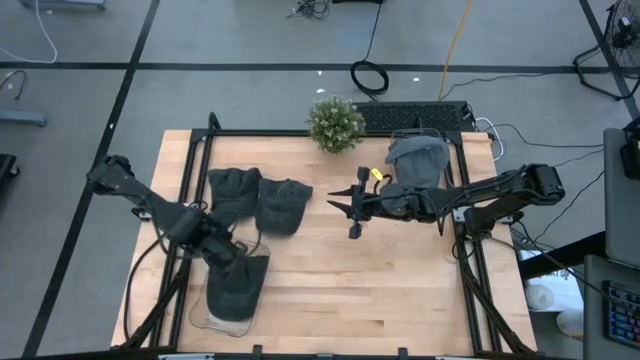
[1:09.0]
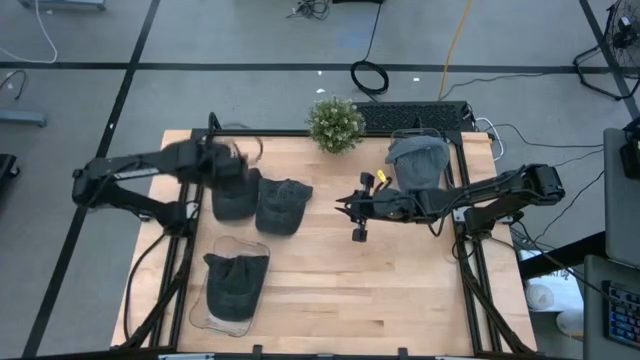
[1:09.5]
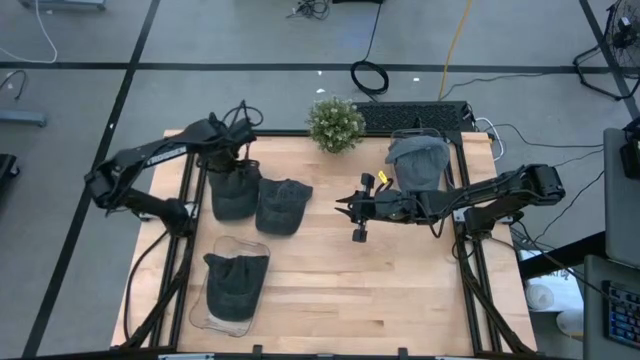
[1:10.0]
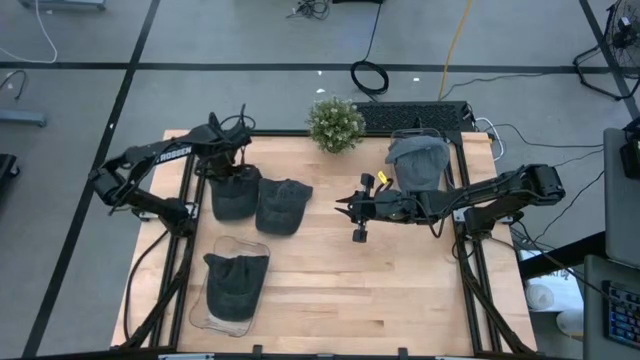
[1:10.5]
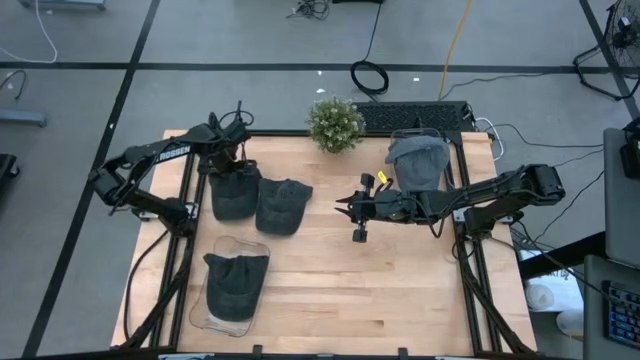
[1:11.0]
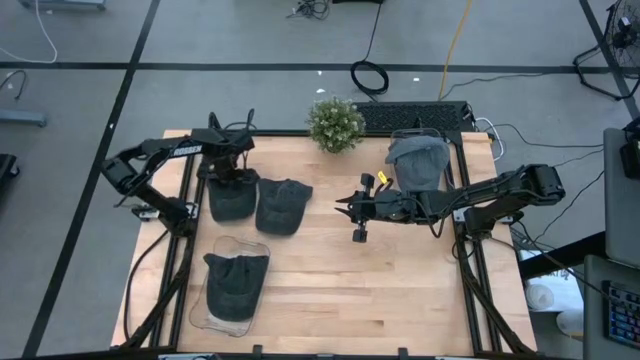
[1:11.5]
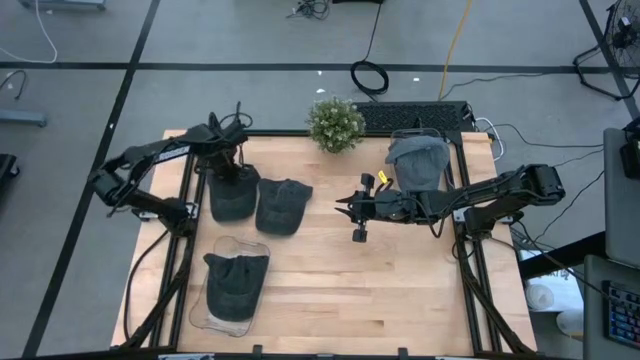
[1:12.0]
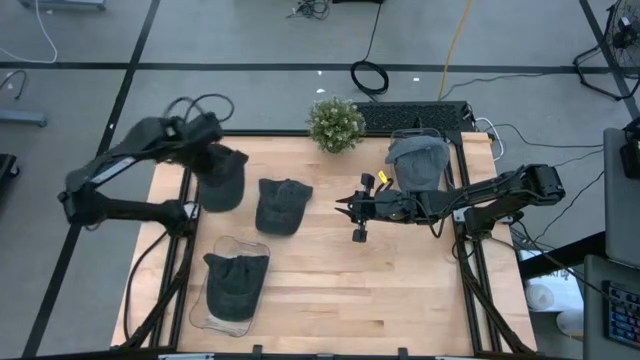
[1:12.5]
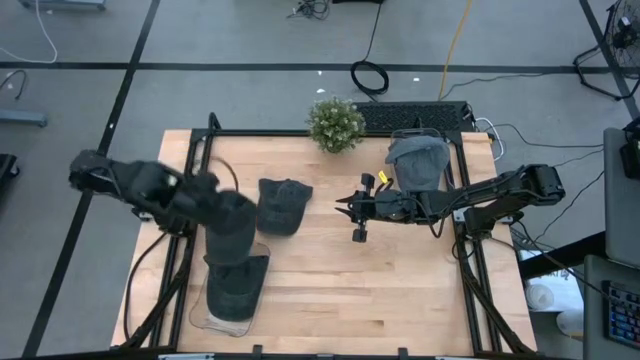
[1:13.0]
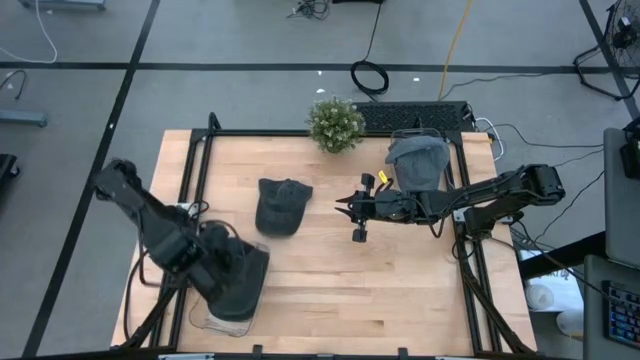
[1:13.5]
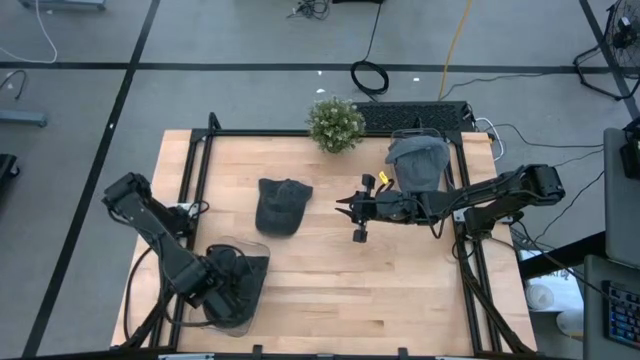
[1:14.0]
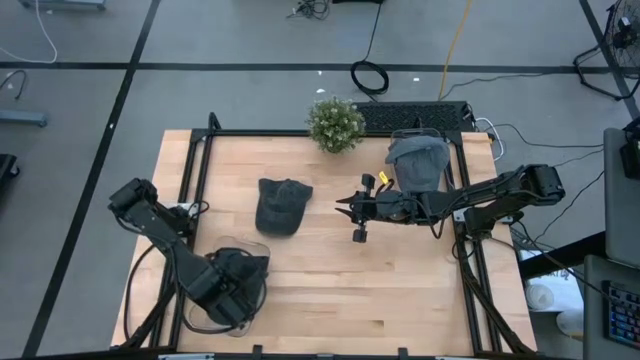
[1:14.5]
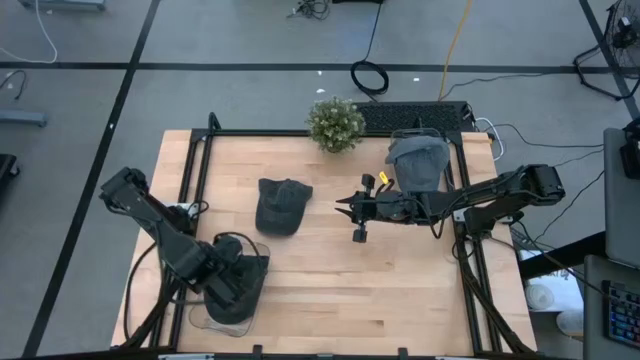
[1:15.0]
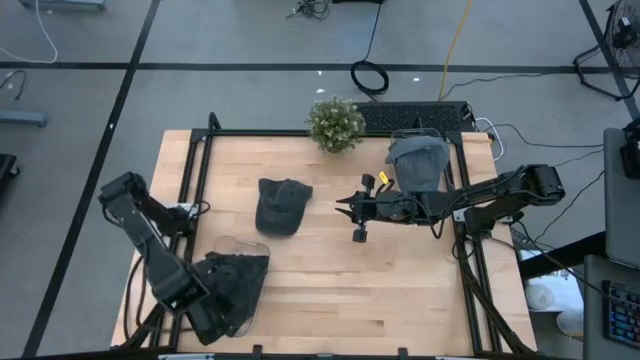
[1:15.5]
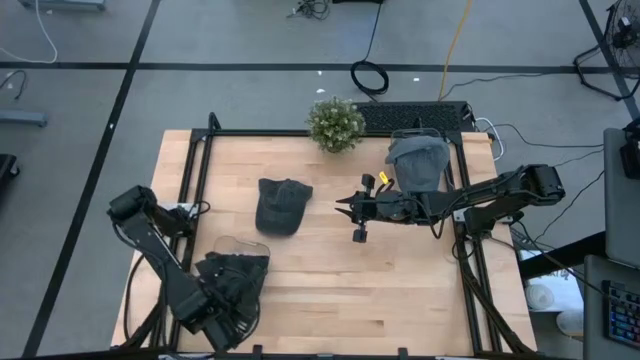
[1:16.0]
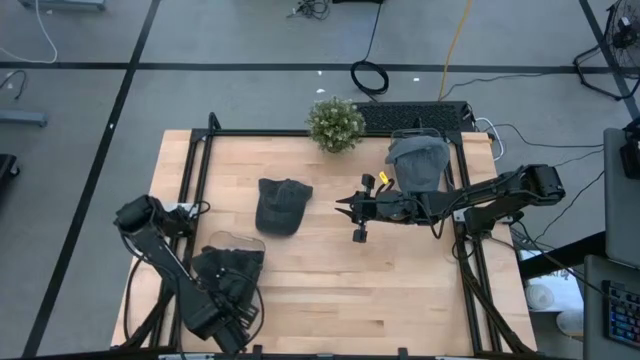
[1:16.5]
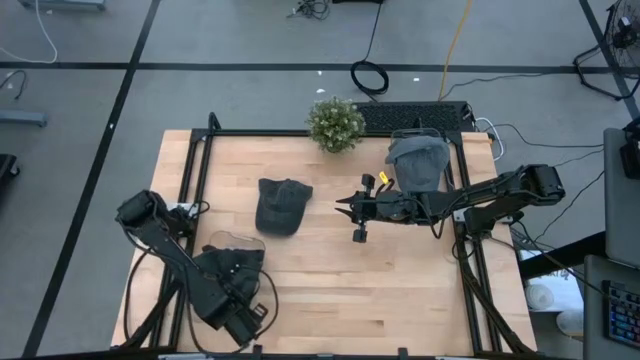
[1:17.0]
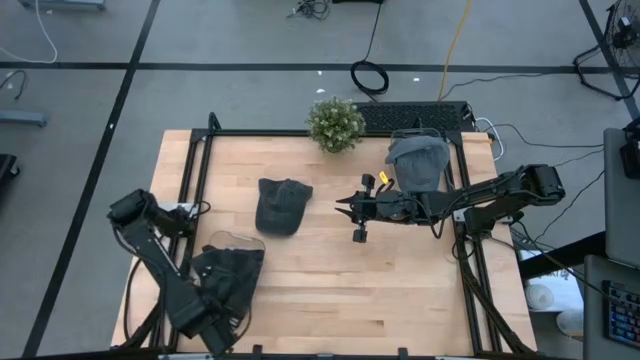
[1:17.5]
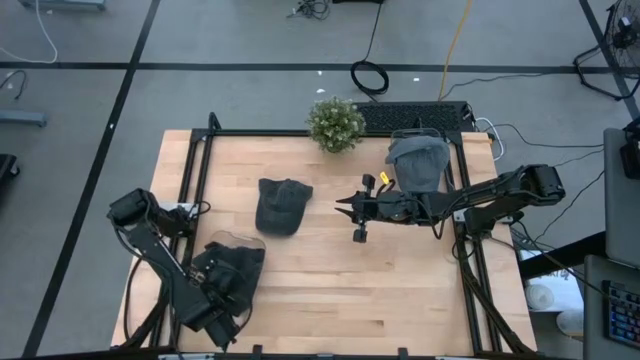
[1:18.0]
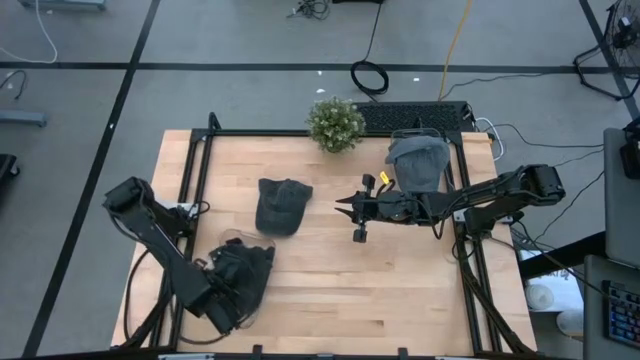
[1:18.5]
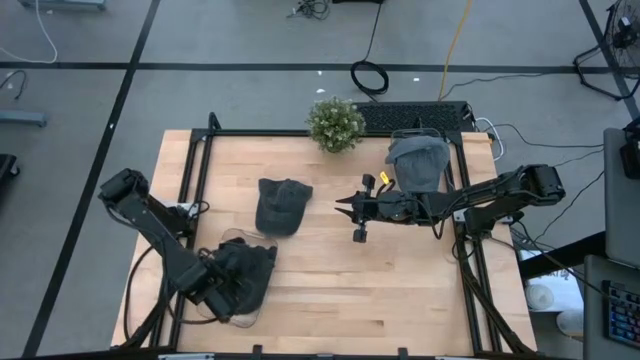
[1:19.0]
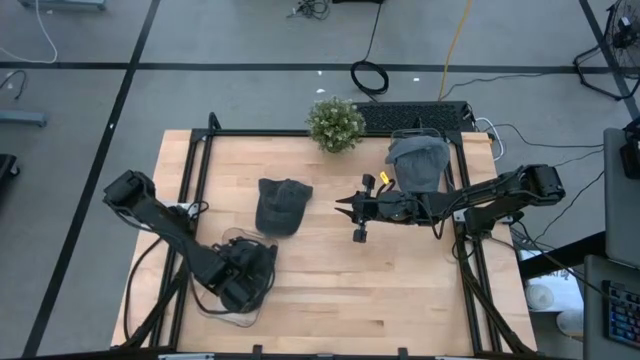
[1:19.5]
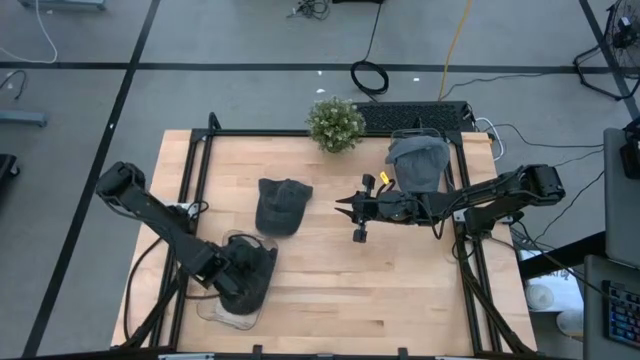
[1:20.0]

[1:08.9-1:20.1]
Task: Pick & Place hat
Put the left black cap into the bottom transparent bin

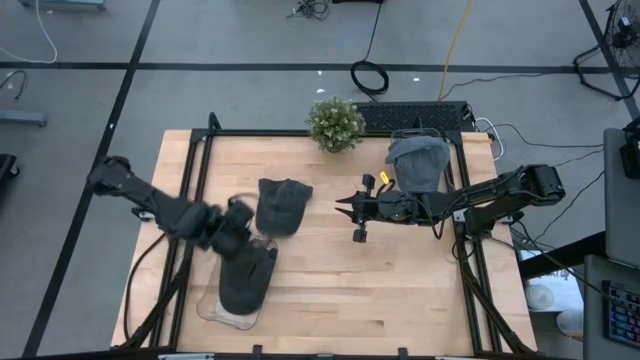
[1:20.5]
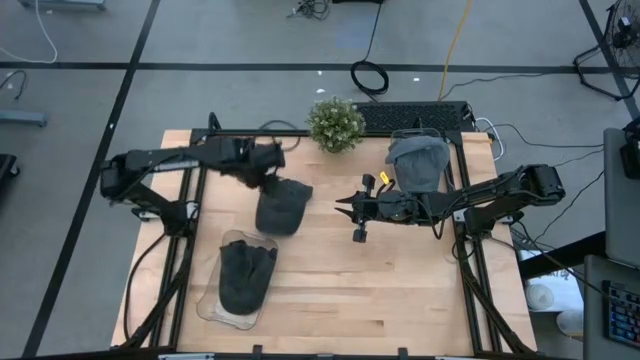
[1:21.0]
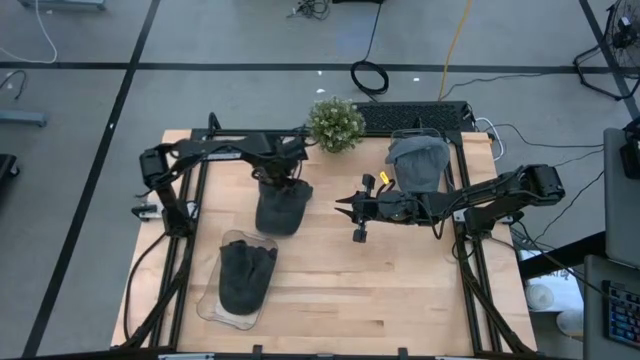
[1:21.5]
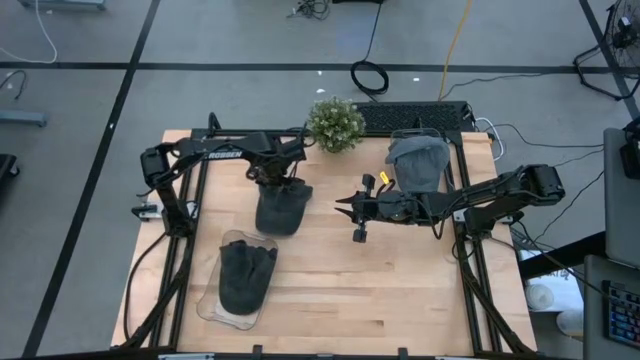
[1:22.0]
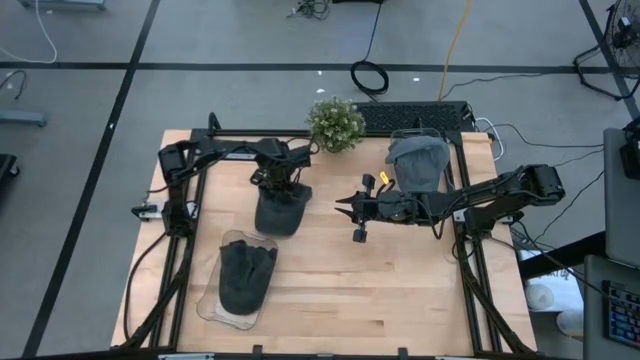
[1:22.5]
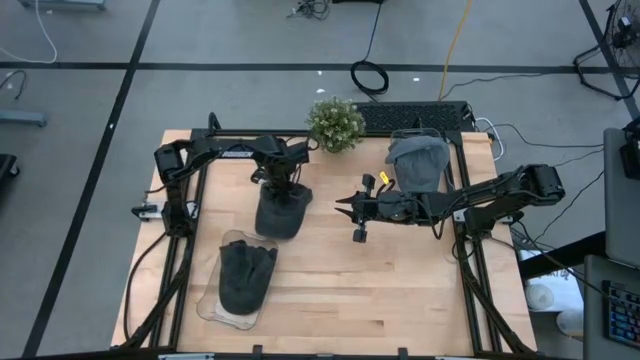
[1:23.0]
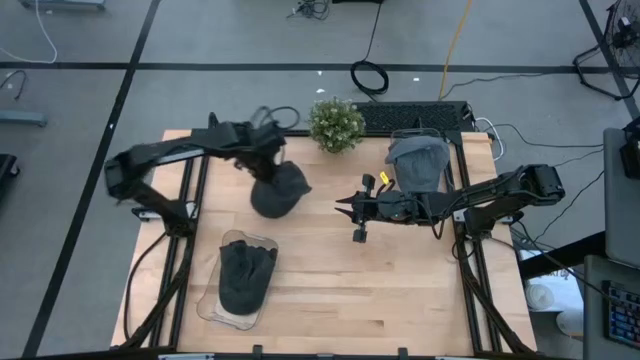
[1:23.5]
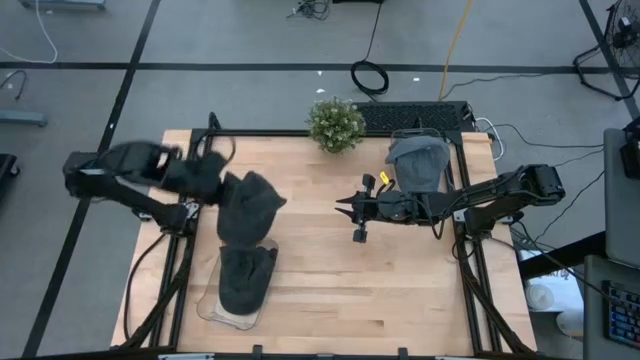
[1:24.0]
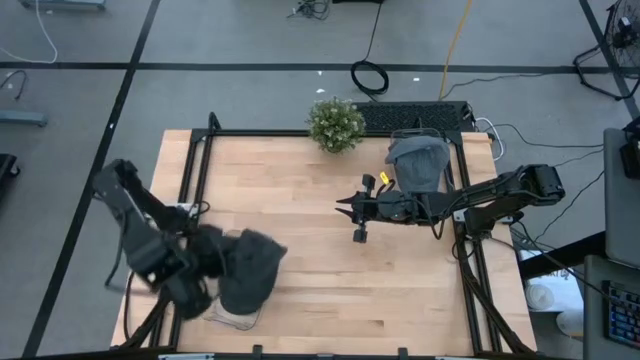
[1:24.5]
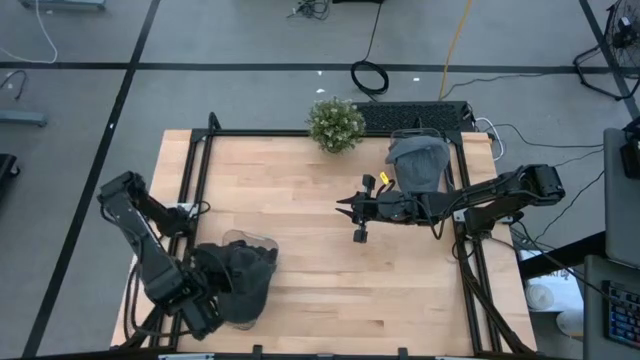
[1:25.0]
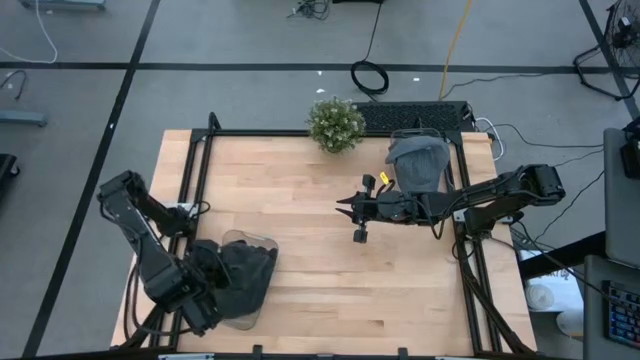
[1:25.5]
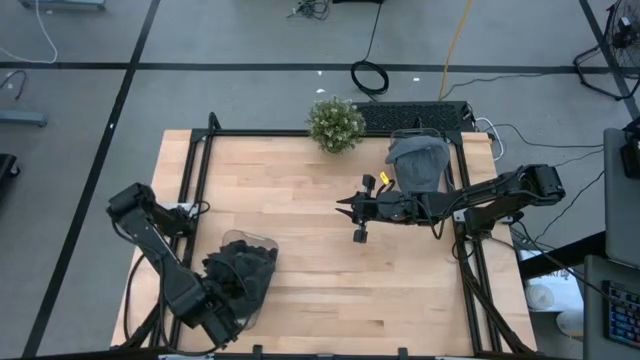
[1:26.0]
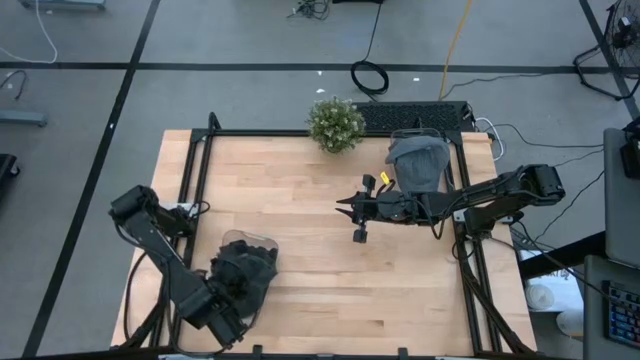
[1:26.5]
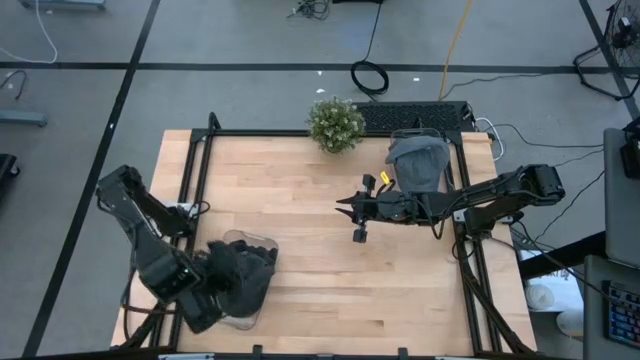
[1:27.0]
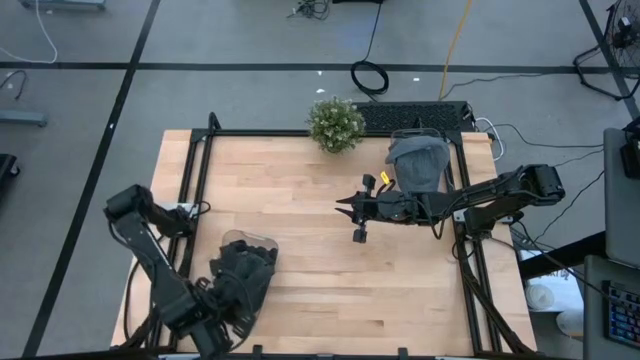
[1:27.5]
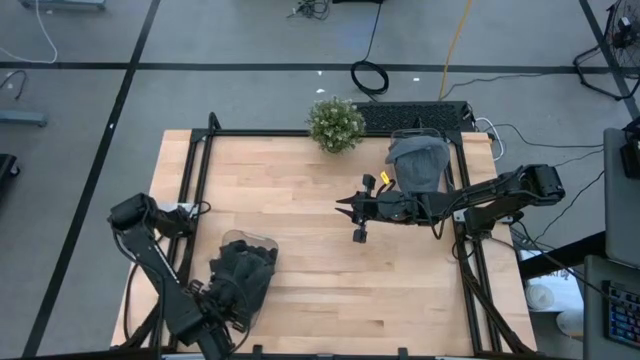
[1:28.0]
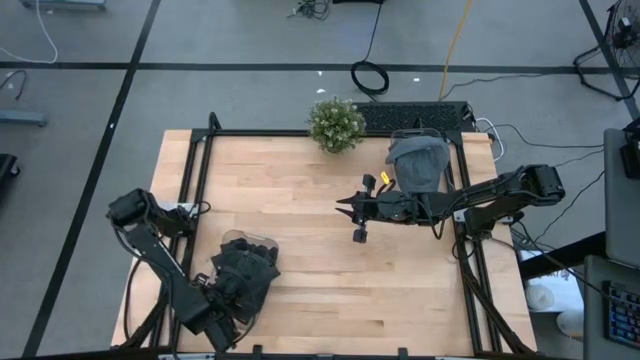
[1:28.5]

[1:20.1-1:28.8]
Put the black cap into the bottom transparent bin

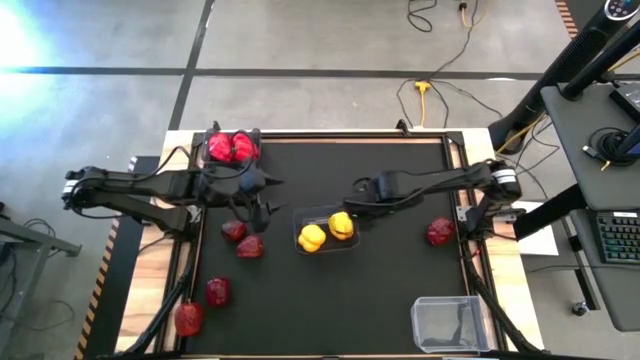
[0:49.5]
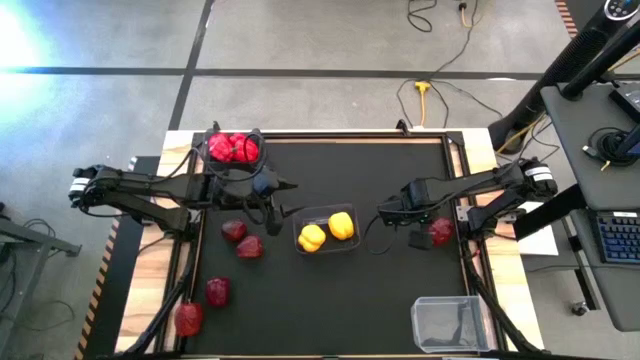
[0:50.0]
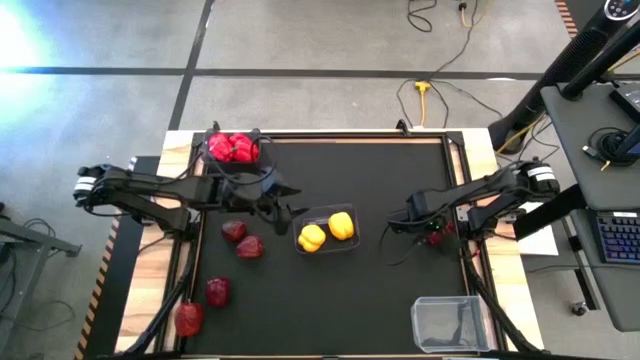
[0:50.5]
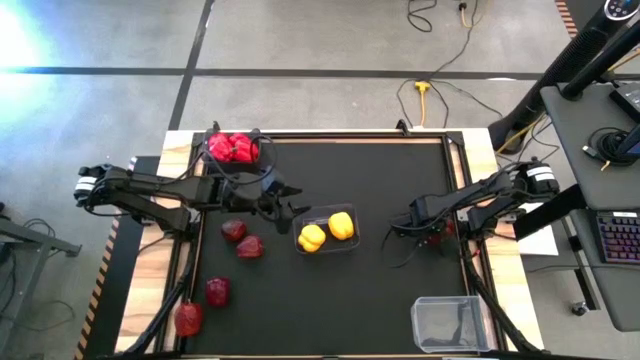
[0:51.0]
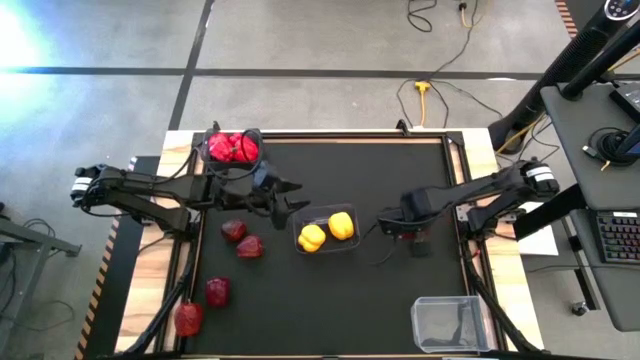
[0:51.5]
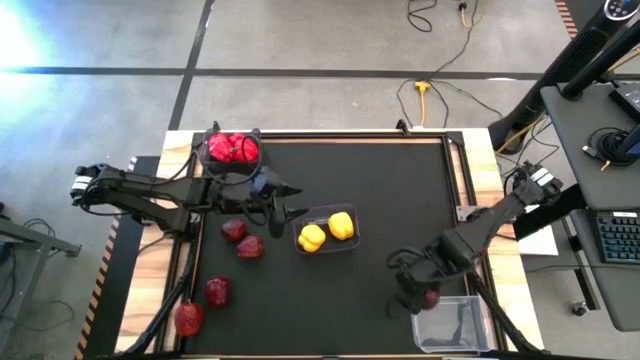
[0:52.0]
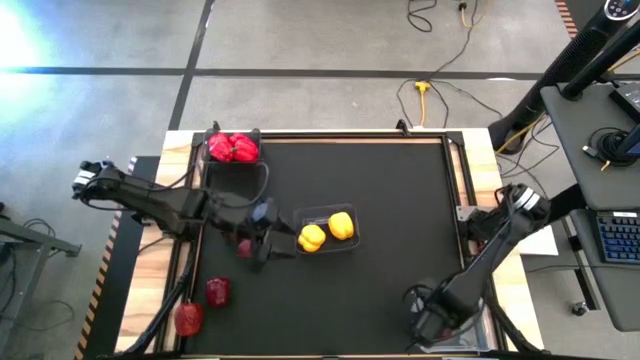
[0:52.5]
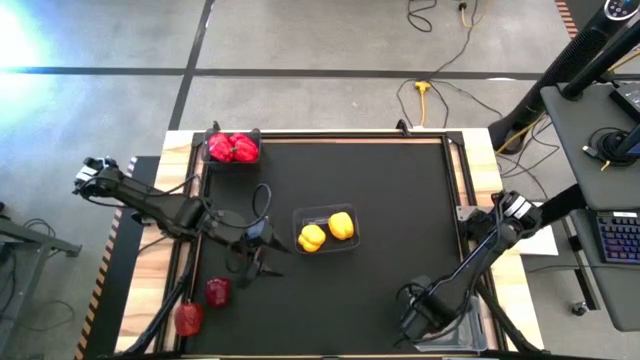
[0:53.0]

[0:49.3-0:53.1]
Task: Sort produce into baskets
Put the red apple into the transparent bin
